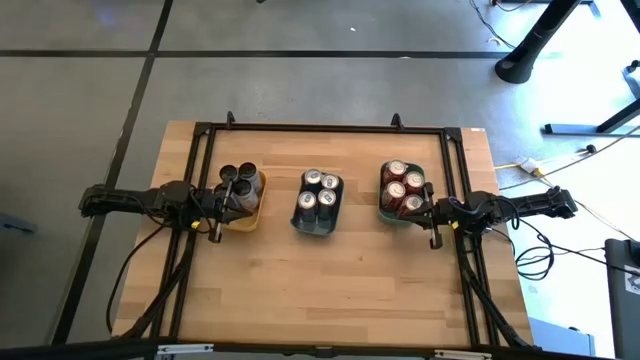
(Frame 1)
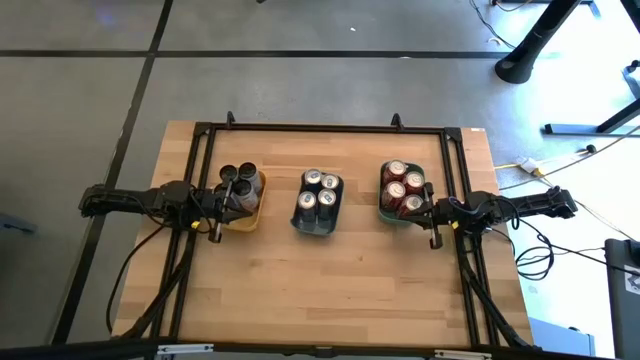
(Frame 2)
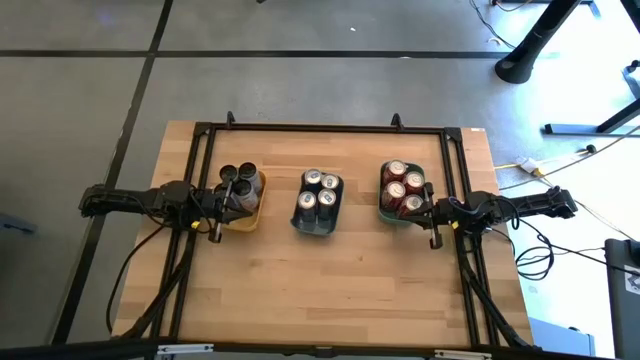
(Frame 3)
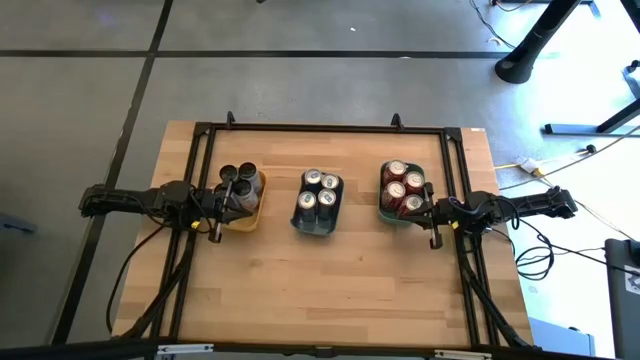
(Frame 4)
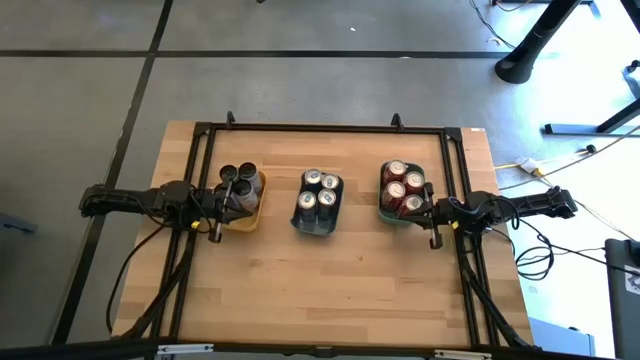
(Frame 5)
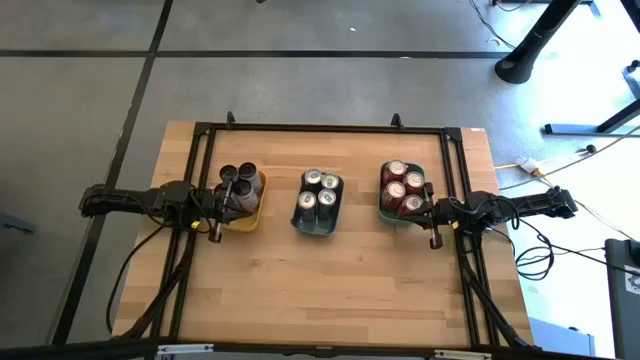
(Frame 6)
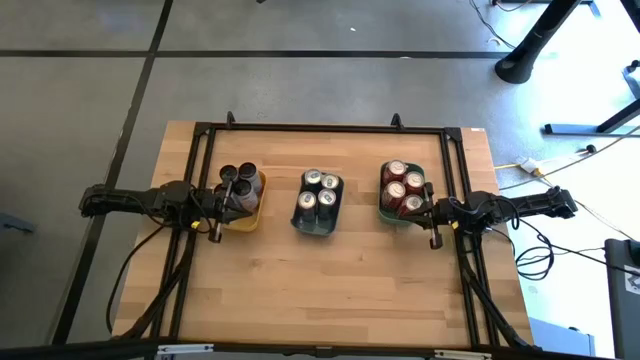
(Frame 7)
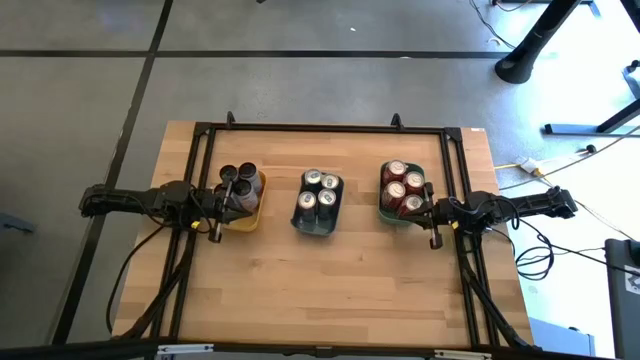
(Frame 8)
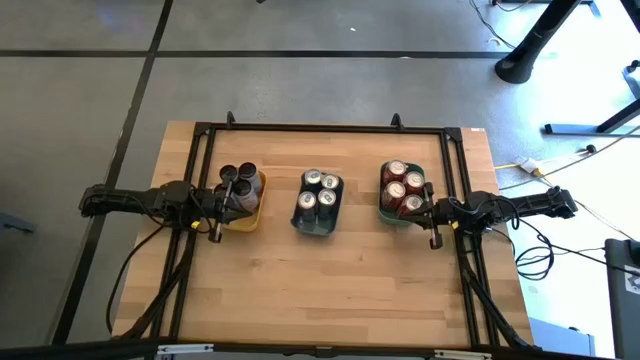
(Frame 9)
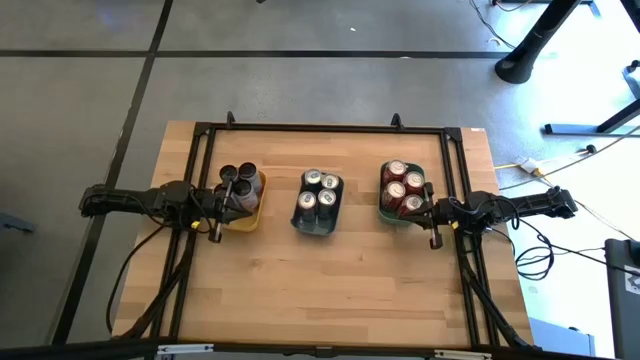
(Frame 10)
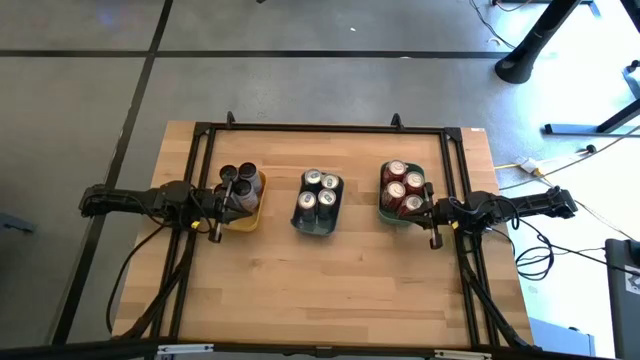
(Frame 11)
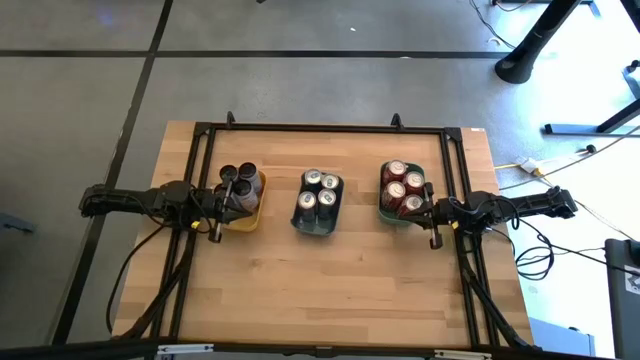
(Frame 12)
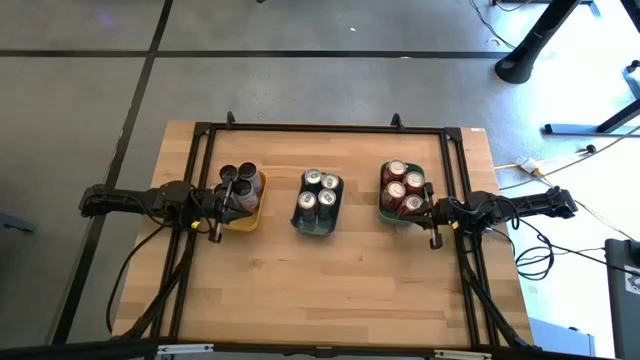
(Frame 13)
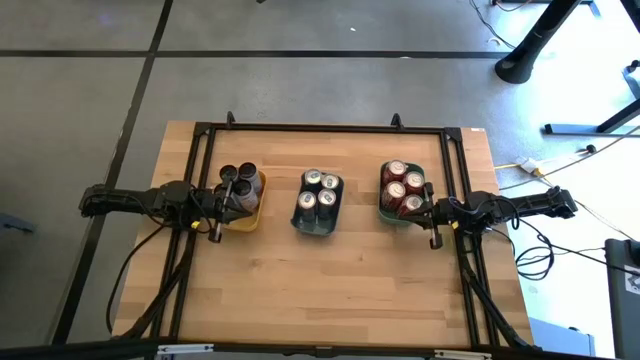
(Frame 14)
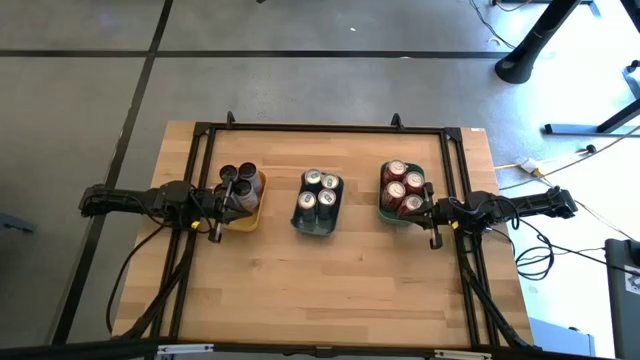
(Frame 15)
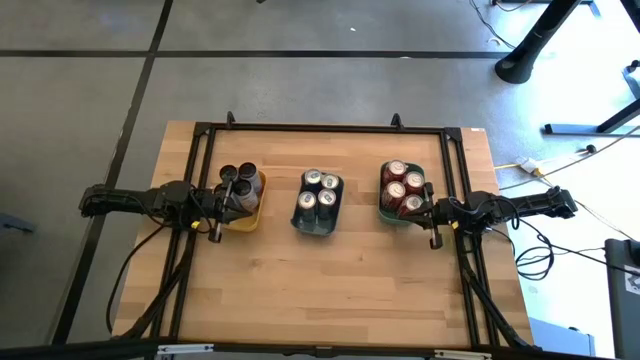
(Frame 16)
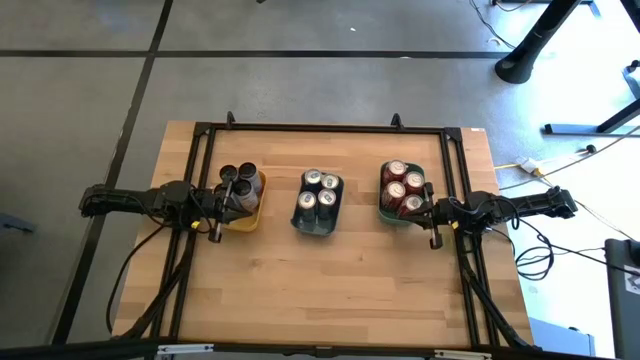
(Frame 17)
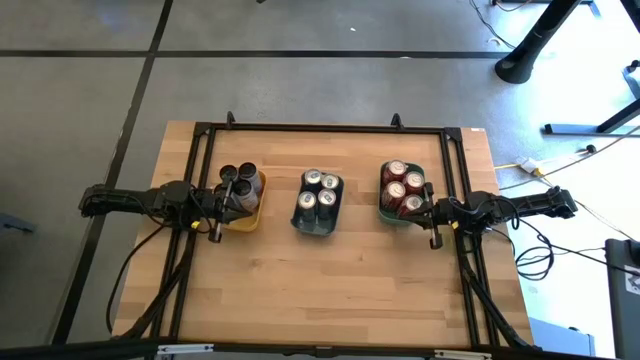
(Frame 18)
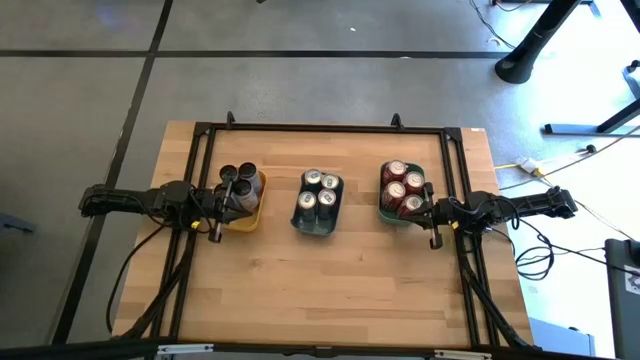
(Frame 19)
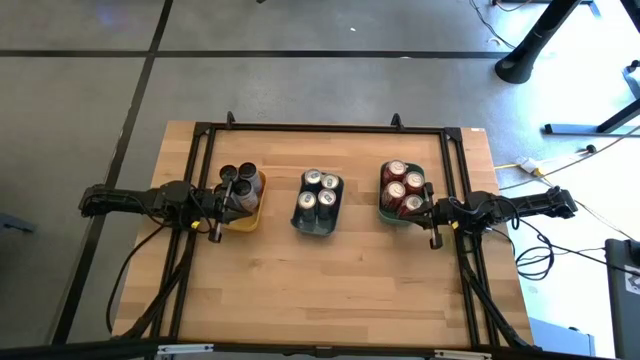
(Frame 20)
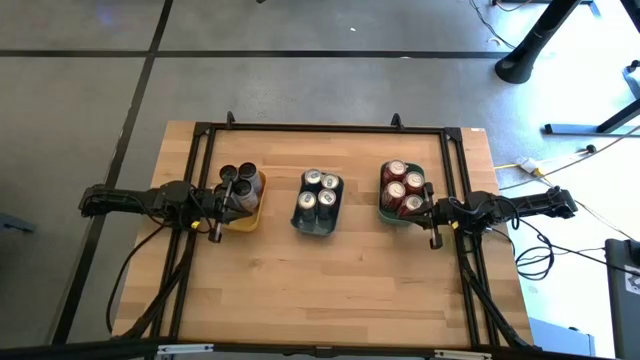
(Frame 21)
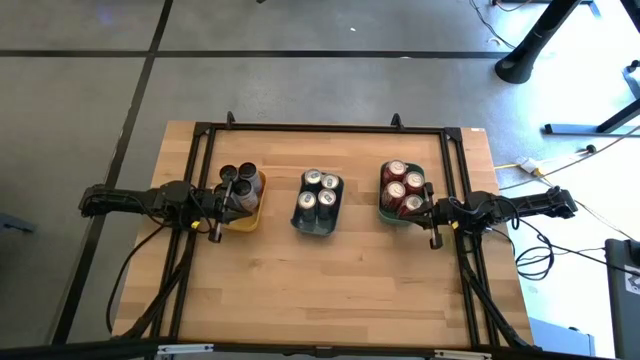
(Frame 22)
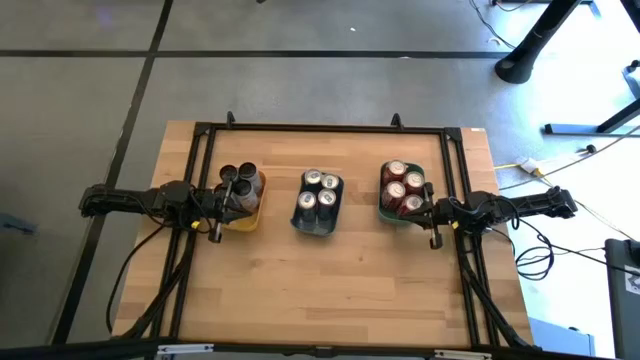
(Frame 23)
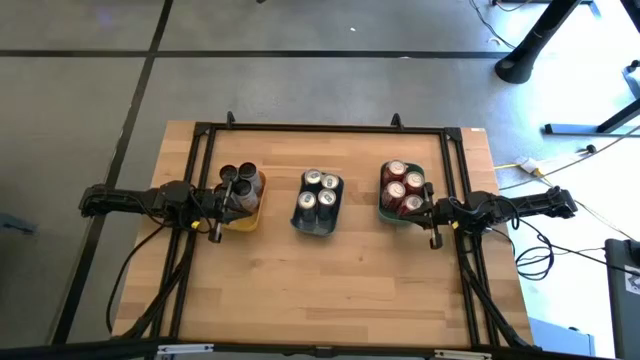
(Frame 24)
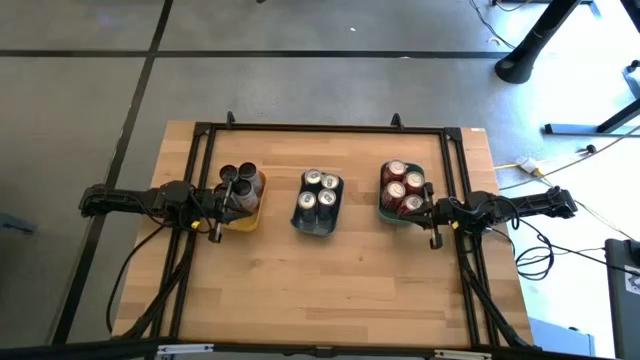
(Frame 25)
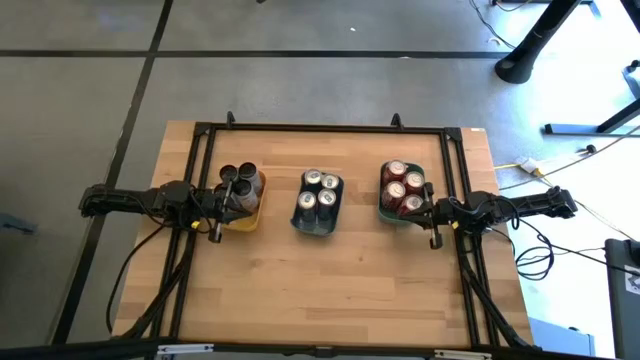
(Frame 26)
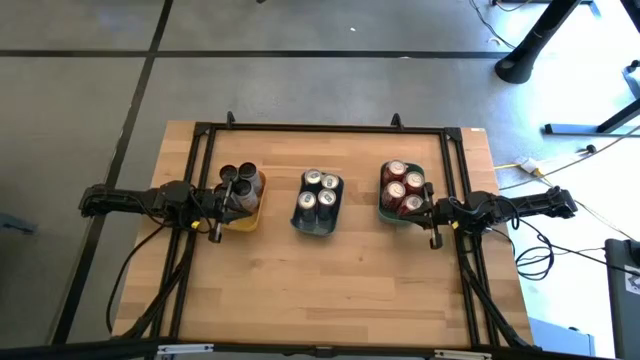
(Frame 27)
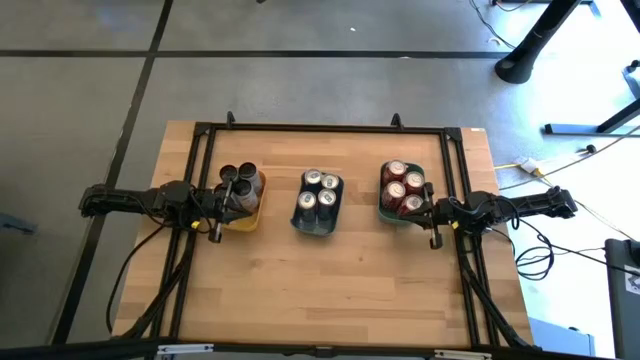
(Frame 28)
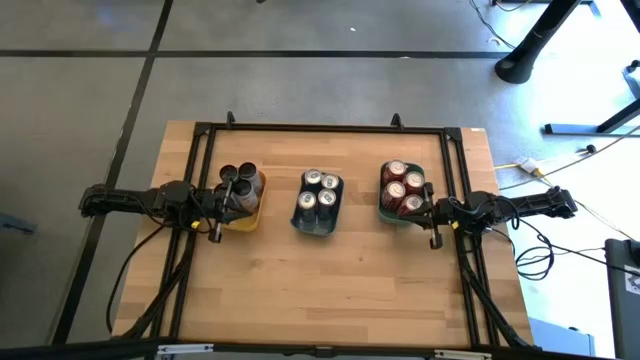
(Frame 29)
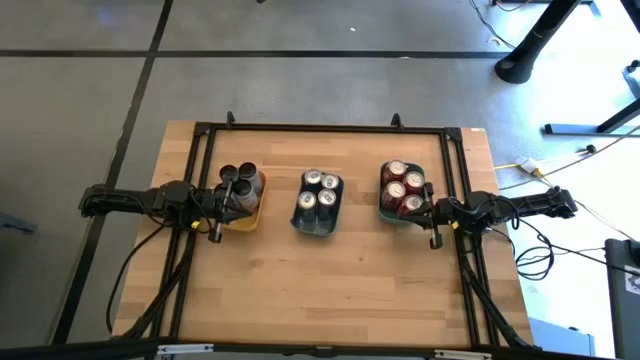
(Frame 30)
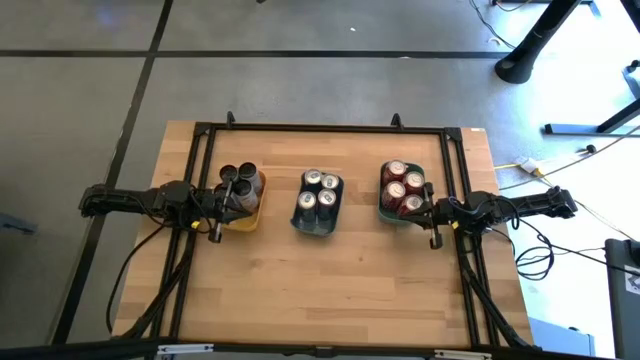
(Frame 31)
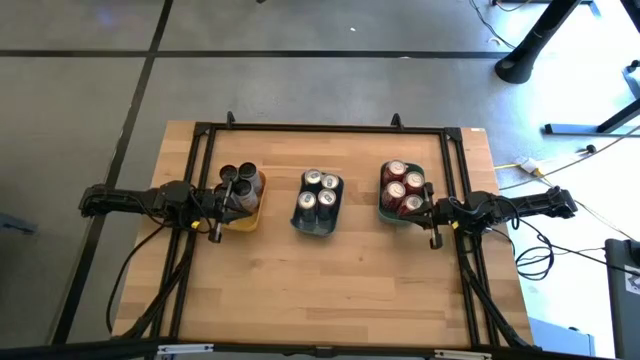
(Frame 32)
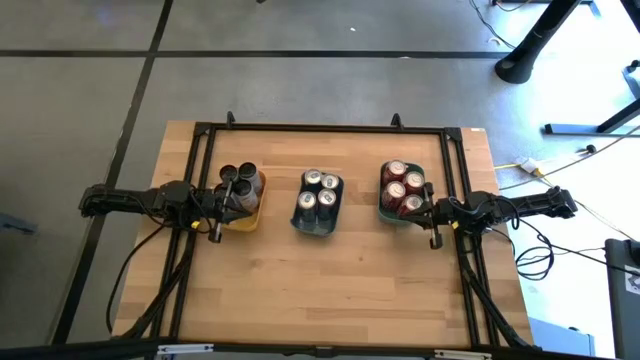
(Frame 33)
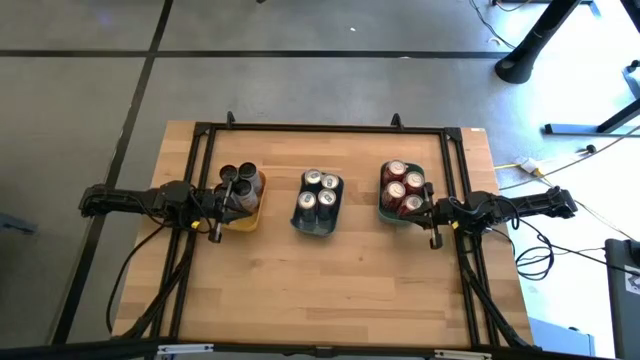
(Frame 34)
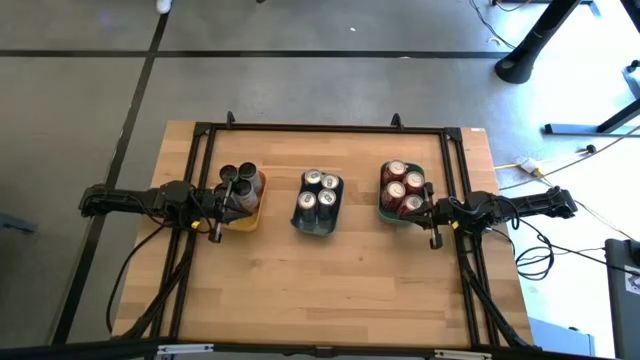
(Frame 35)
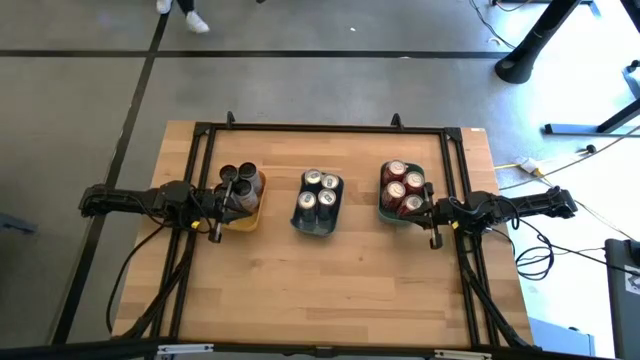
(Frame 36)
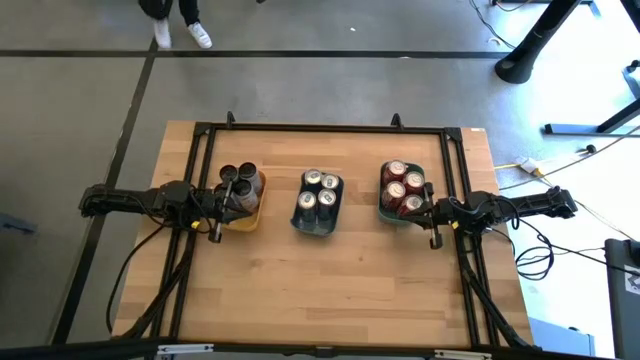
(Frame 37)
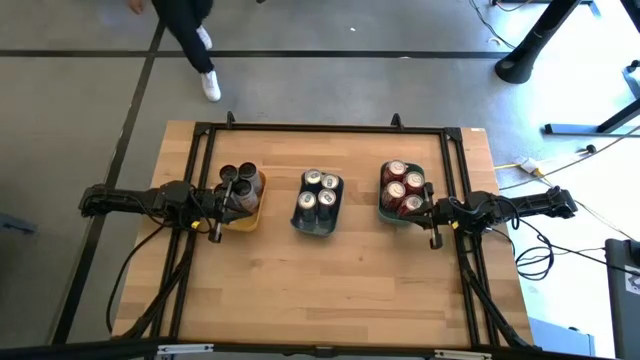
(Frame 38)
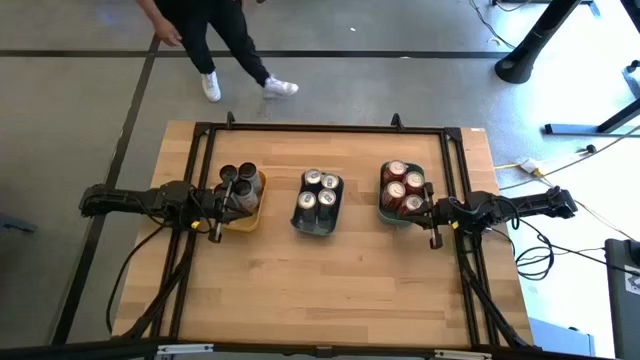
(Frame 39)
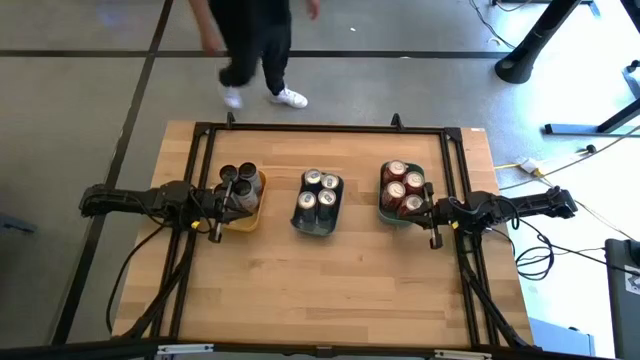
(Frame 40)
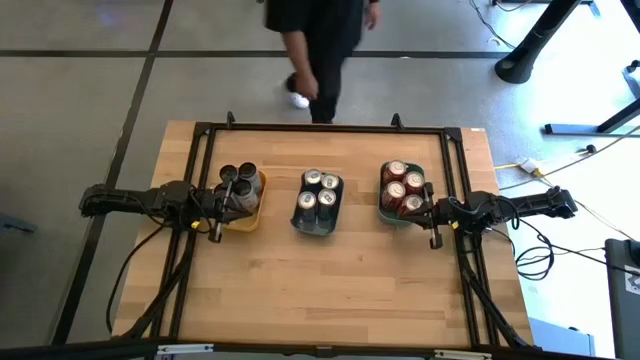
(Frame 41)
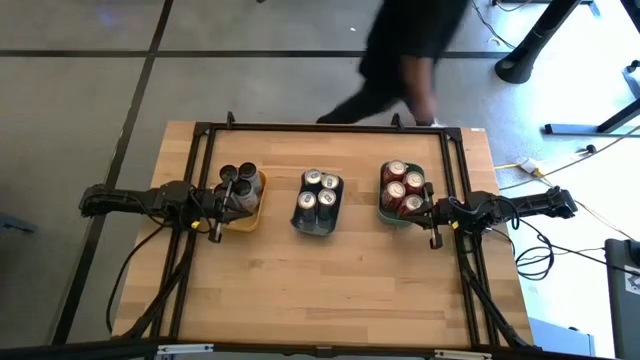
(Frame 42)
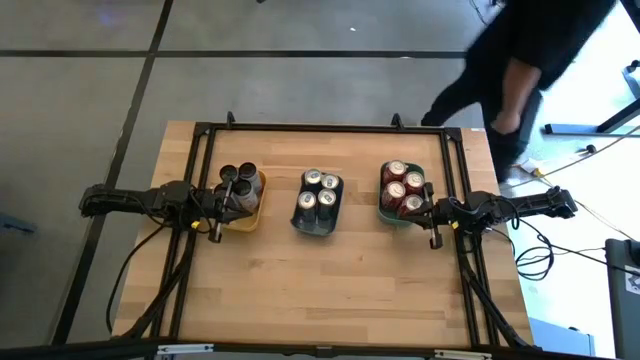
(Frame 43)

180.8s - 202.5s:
Task: Sort soda cans
Return to Home Position
